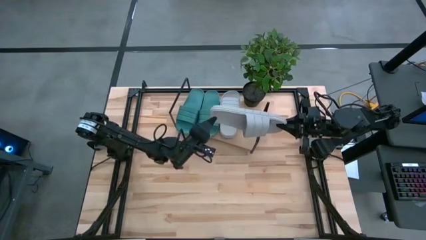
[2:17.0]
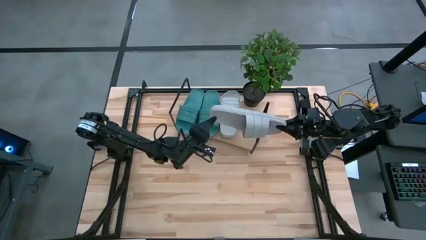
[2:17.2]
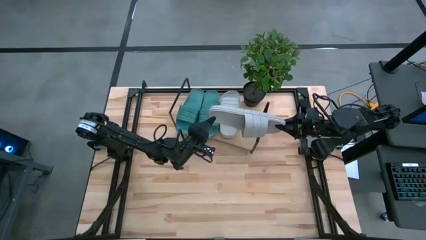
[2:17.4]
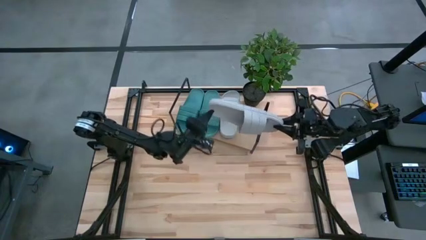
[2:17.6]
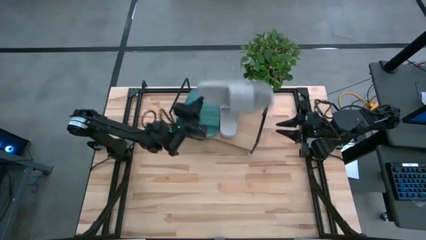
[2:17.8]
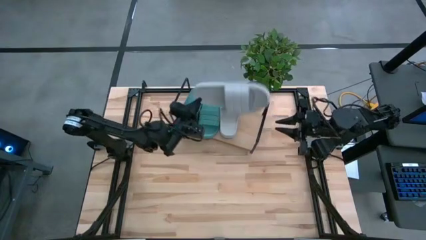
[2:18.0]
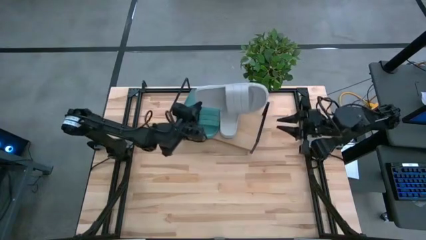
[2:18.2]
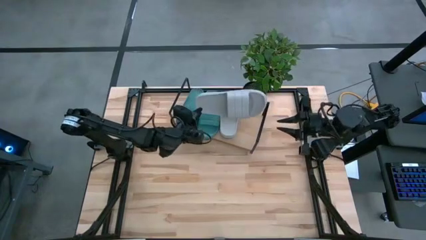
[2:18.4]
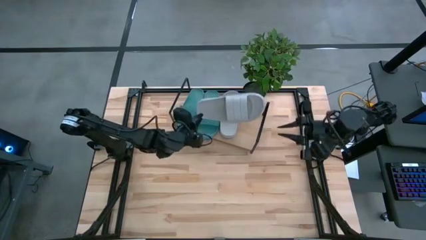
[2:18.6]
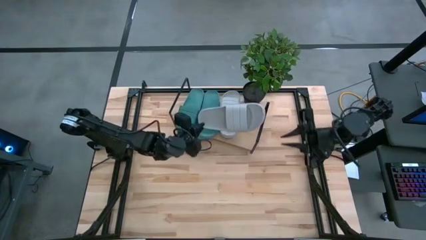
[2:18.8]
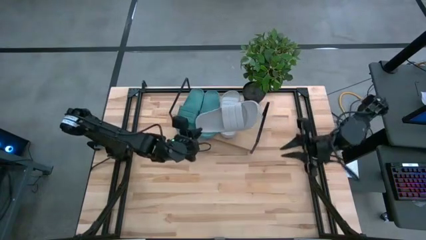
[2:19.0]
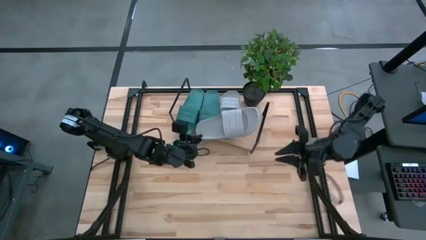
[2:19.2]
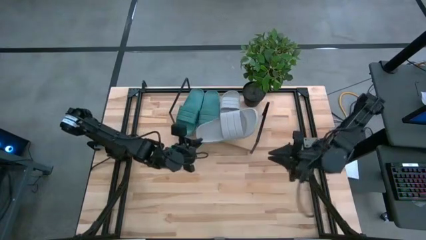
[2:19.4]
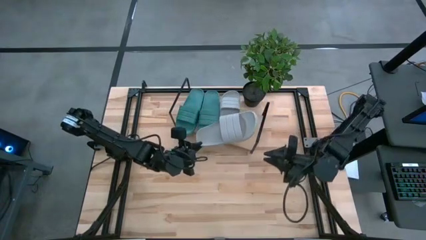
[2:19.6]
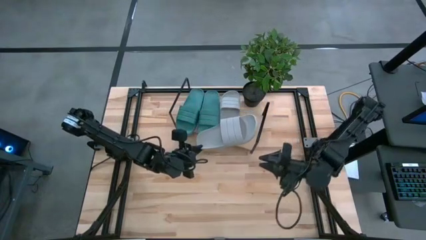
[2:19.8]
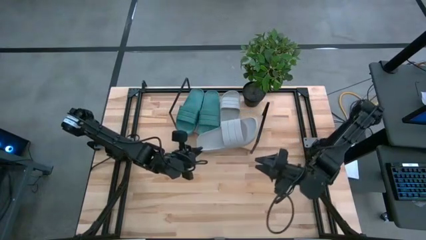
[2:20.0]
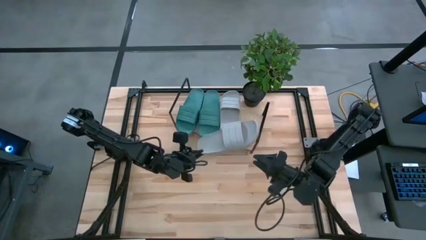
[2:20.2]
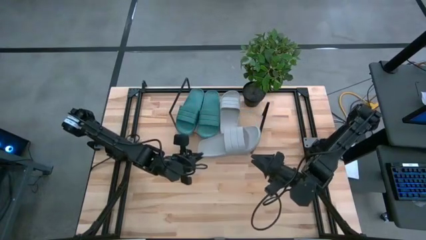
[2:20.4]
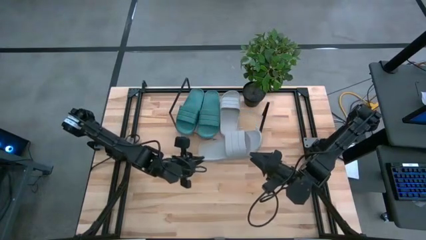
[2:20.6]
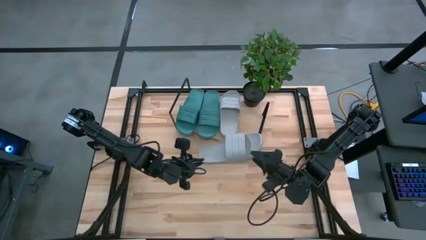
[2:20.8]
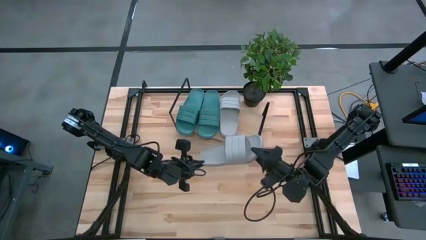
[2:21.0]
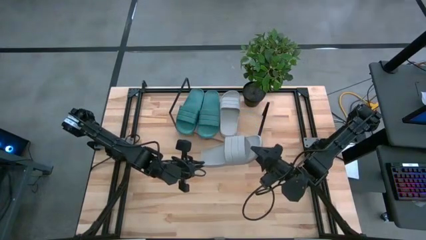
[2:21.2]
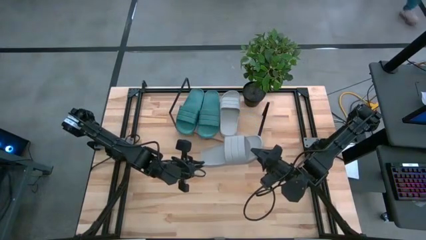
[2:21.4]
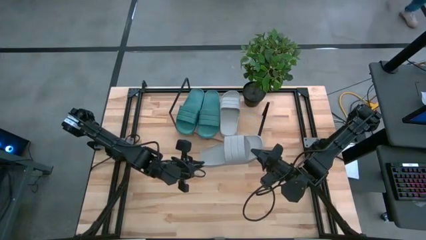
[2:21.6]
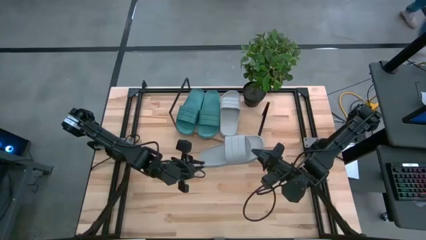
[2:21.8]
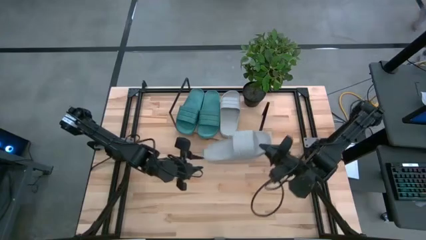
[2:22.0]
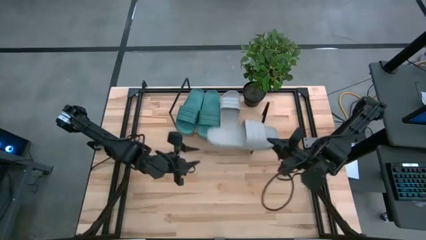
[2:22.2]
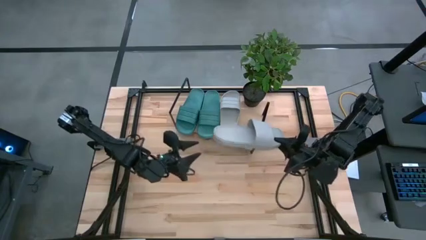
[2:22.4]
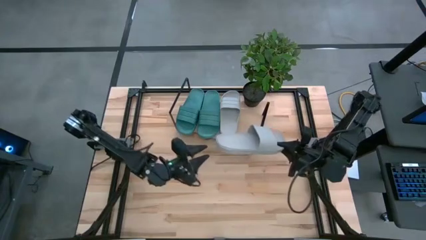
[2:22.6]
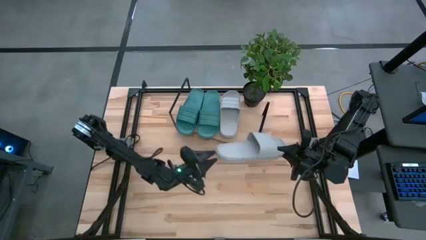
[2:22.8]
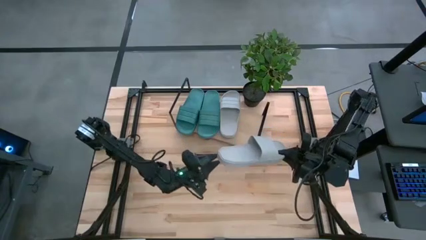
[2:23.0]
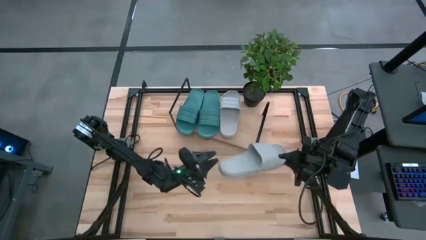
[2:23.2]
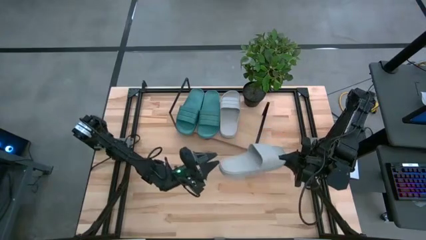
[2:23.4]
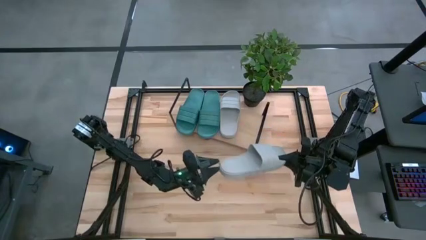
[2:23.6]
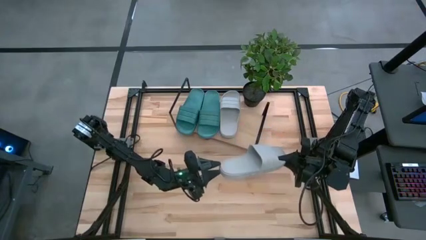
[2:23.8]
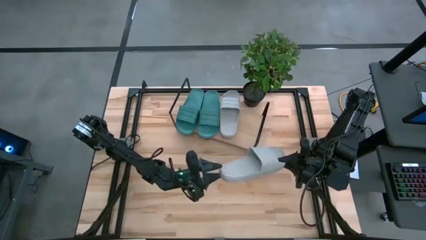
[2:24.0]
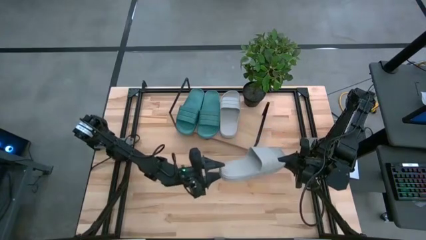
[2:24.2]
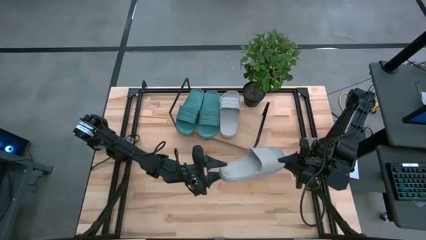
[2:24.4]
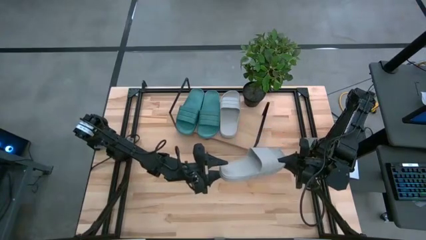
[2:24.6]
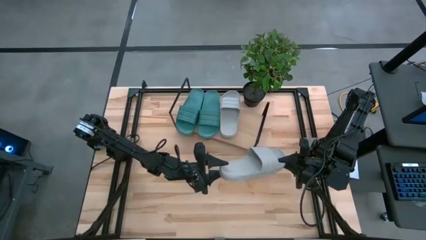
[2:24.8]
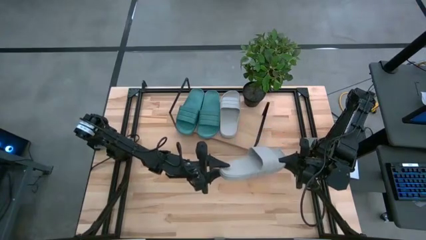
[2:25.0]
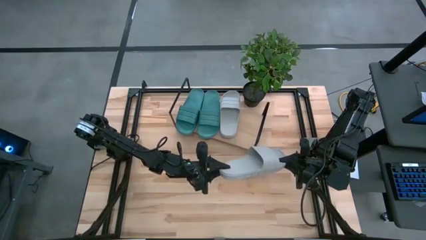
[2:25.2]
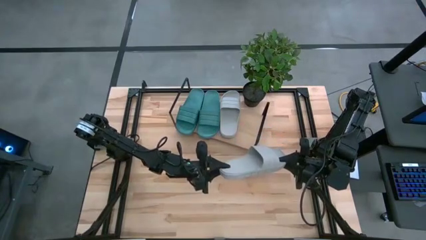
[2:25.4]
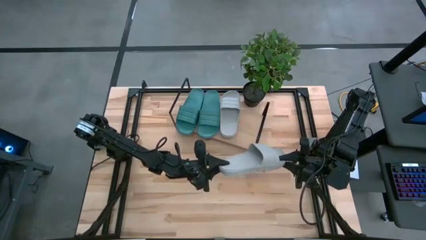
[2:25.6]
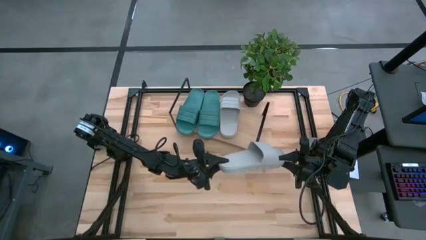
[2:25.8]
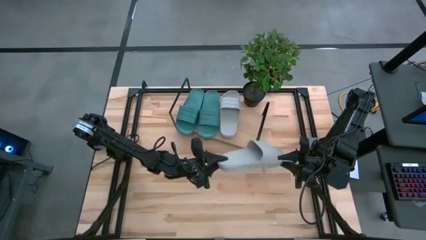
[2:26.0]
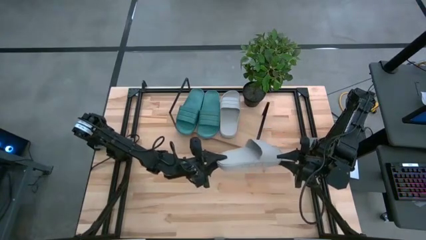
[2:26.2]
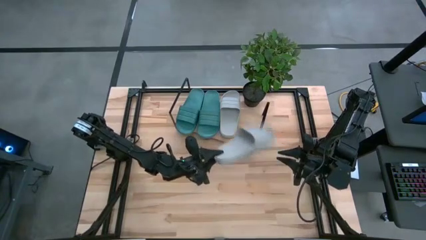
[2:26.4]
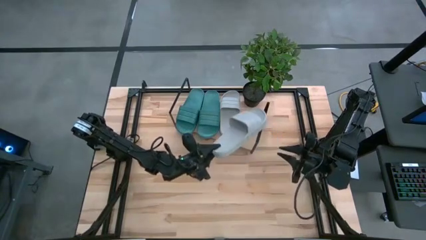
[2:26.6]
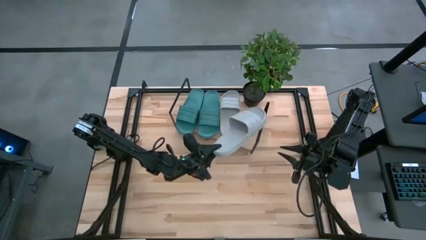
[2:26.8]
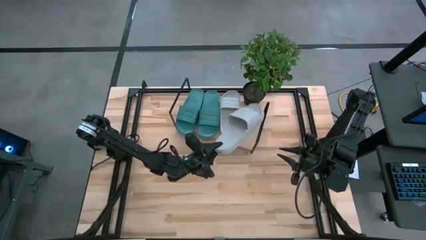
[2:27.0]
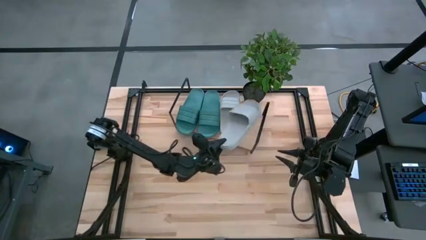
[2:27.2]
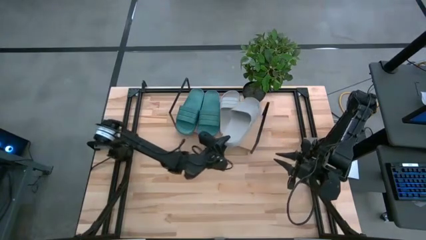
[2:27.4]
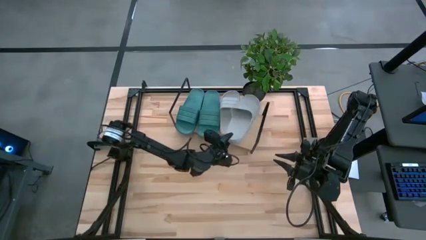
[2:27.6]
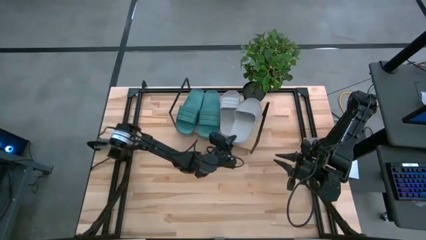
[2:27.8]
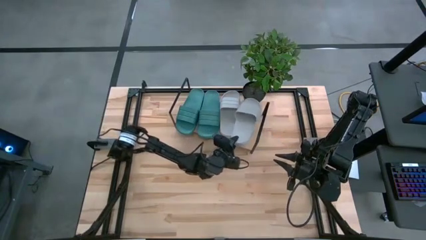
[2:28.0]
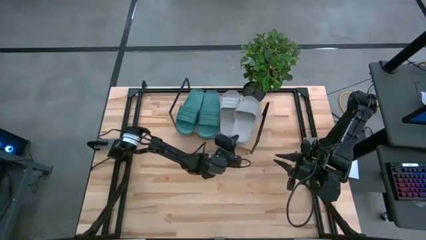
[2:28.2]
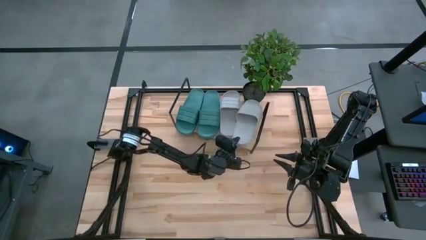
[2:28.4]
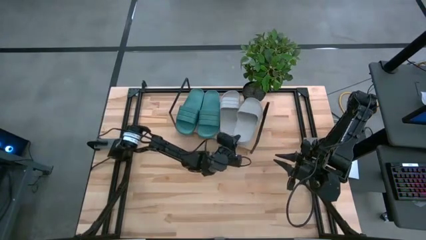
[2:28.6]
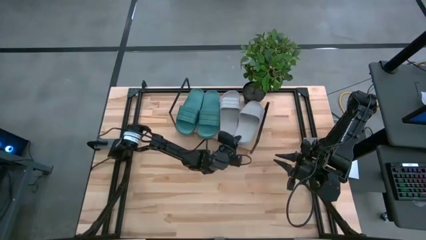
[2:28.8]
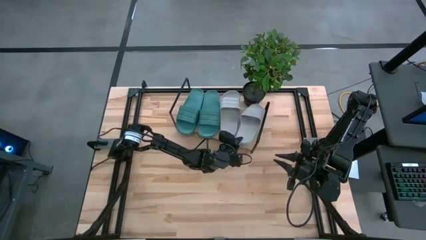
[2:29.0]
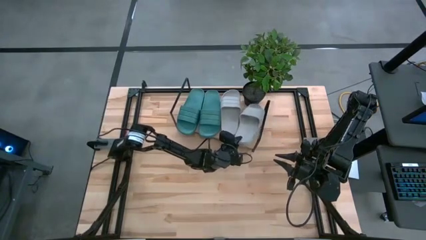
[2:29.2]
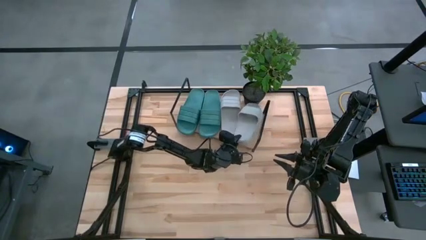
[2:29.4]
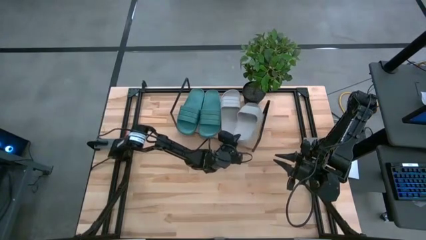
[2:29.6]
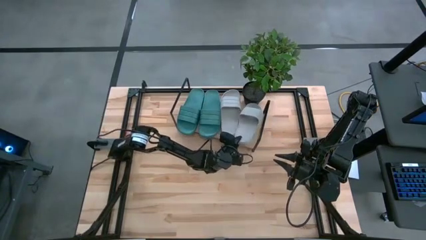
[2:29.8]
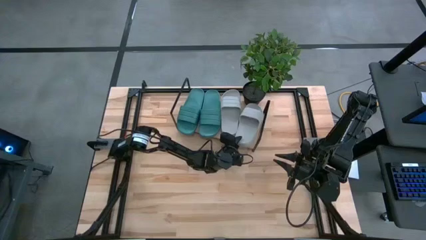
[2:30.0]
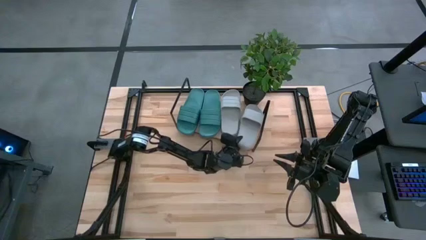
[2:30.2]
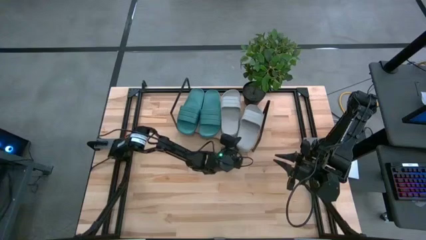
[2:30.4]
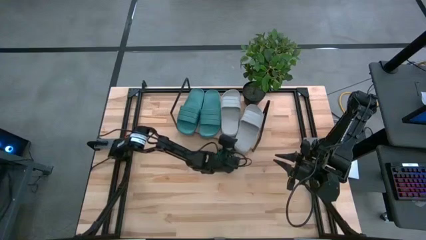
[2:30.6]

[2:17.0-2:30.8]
Task: Pick and place slides into the shelf
Put the gray slipper on the shelf
